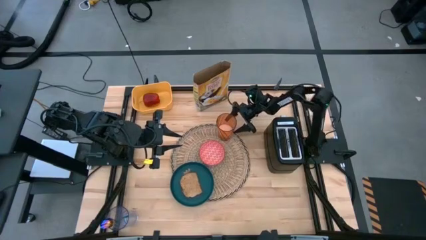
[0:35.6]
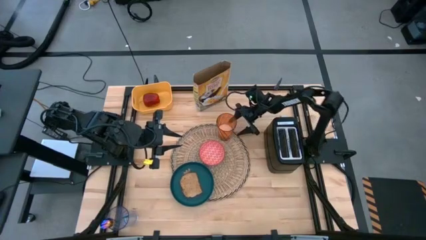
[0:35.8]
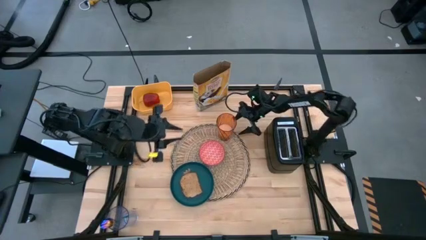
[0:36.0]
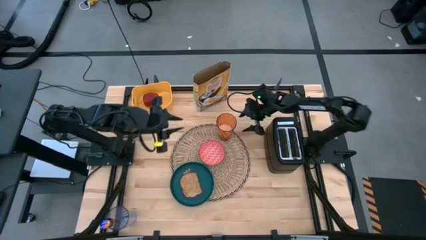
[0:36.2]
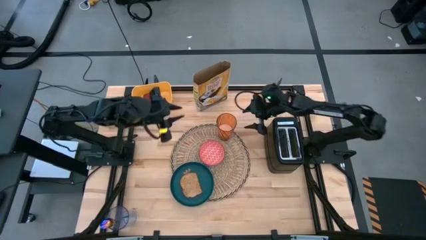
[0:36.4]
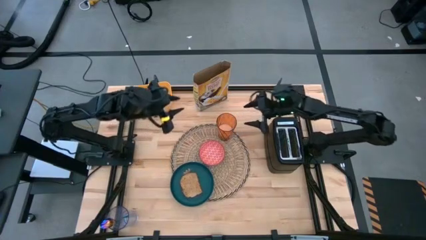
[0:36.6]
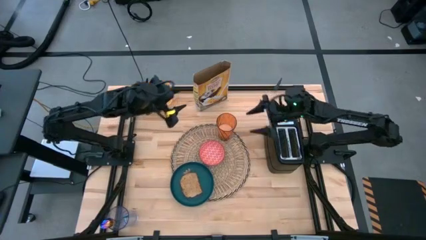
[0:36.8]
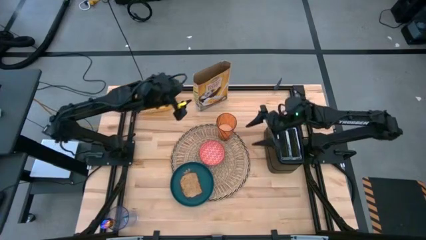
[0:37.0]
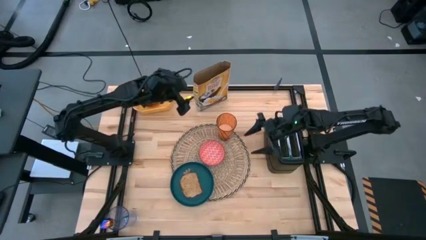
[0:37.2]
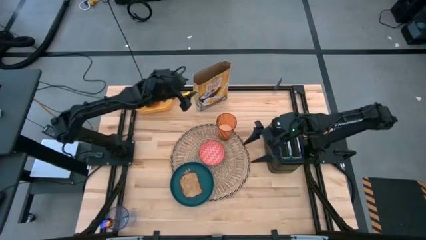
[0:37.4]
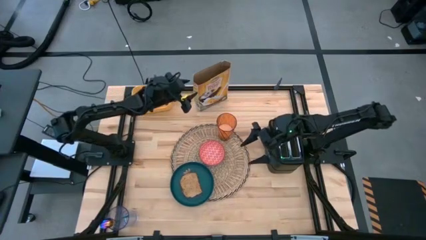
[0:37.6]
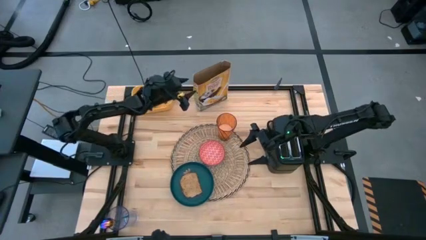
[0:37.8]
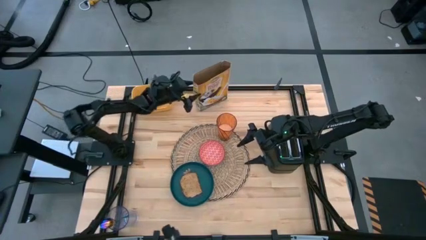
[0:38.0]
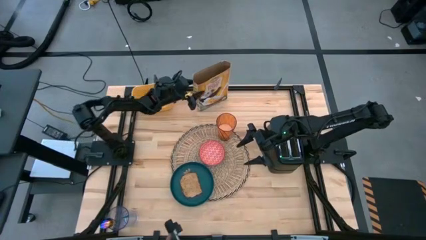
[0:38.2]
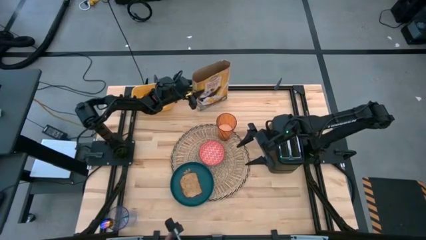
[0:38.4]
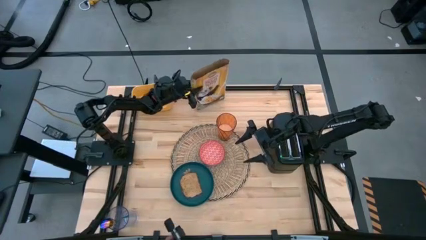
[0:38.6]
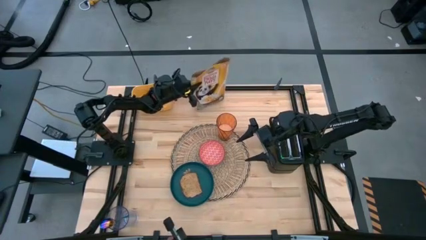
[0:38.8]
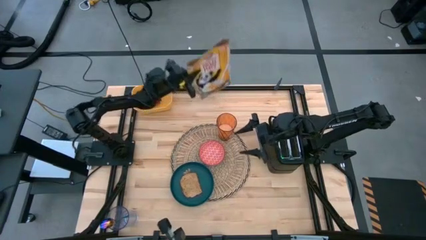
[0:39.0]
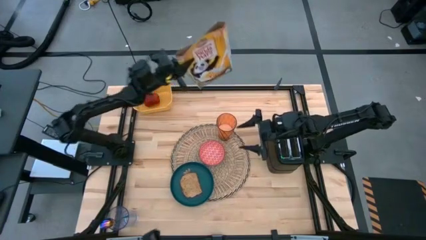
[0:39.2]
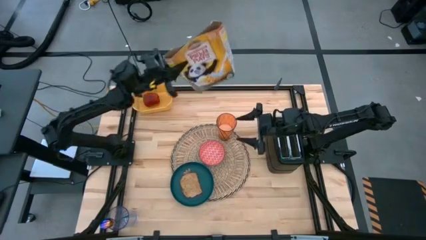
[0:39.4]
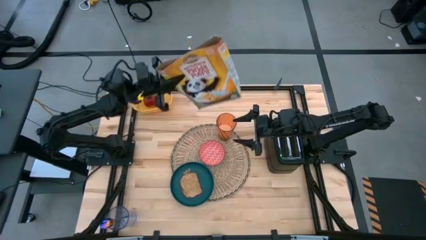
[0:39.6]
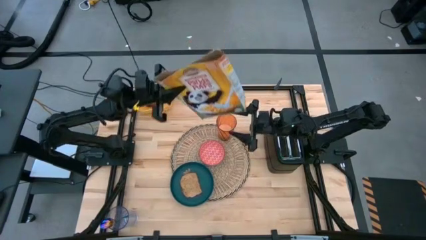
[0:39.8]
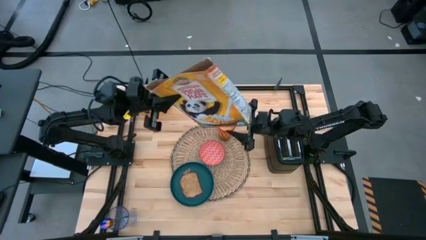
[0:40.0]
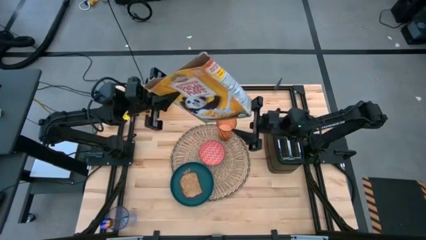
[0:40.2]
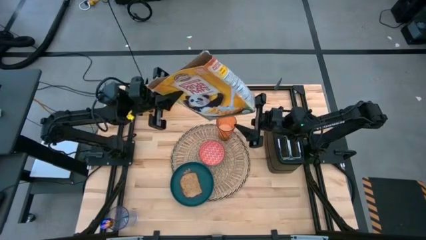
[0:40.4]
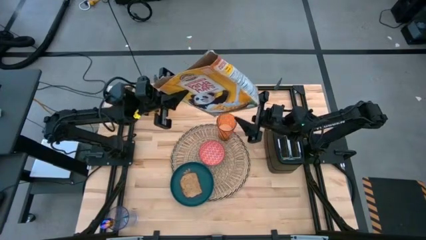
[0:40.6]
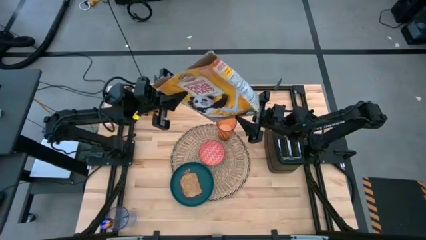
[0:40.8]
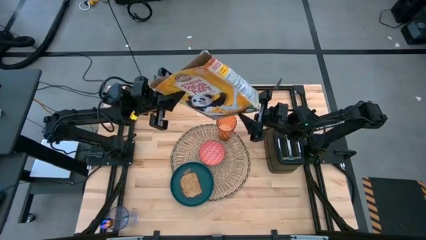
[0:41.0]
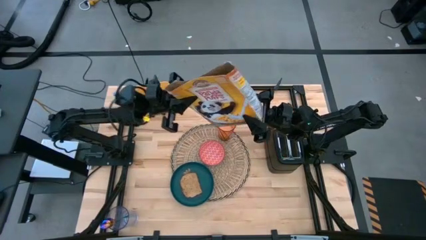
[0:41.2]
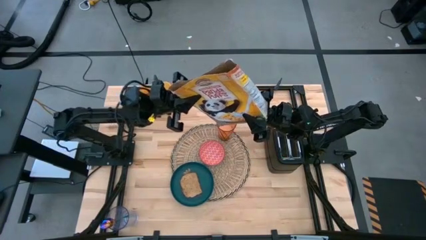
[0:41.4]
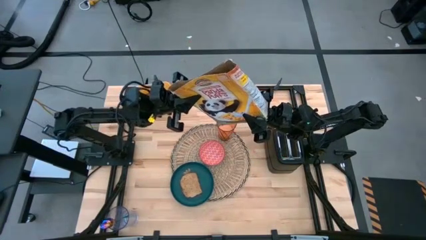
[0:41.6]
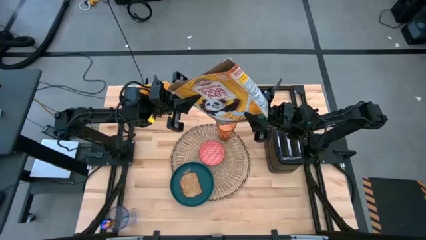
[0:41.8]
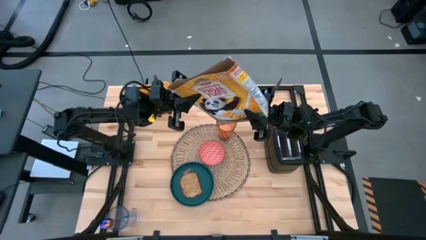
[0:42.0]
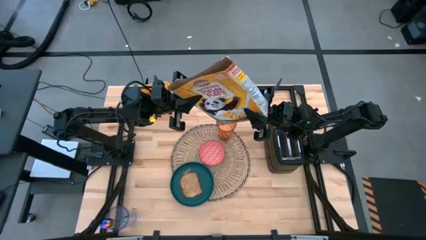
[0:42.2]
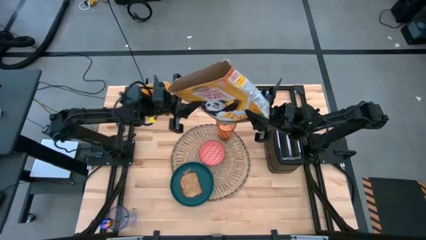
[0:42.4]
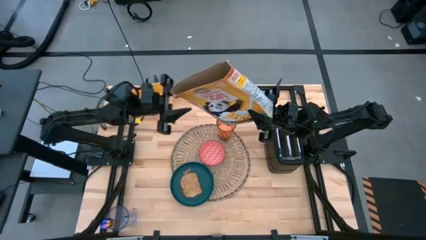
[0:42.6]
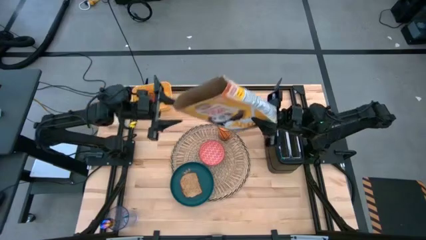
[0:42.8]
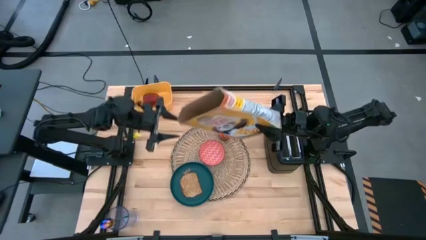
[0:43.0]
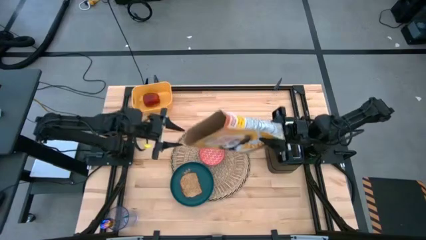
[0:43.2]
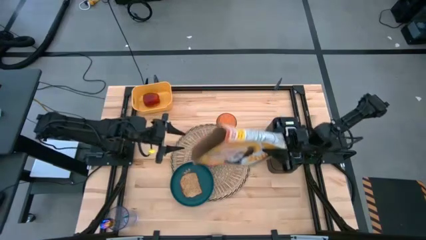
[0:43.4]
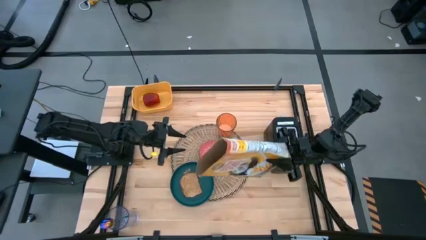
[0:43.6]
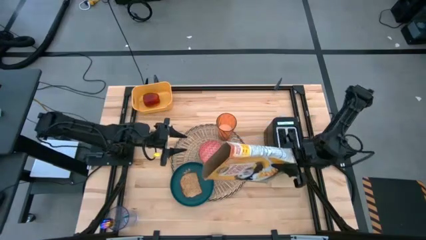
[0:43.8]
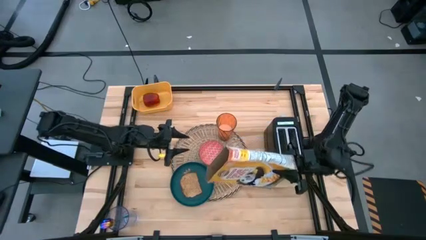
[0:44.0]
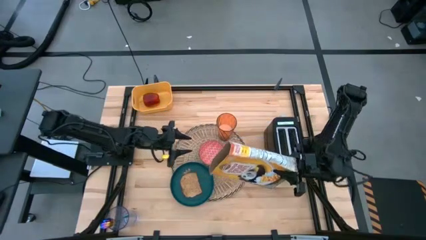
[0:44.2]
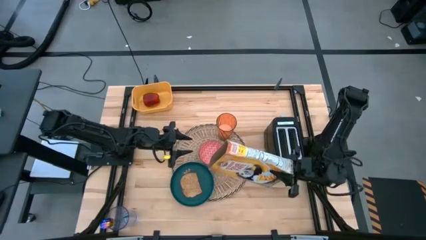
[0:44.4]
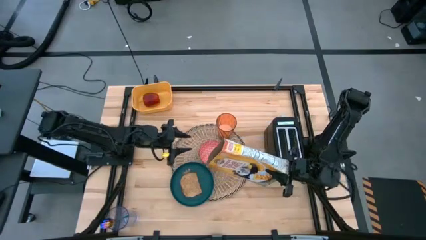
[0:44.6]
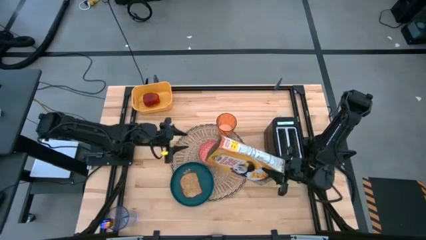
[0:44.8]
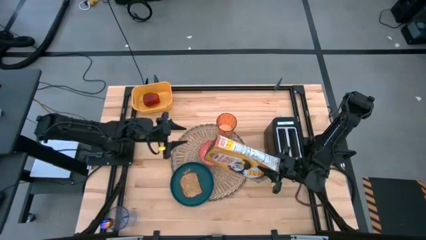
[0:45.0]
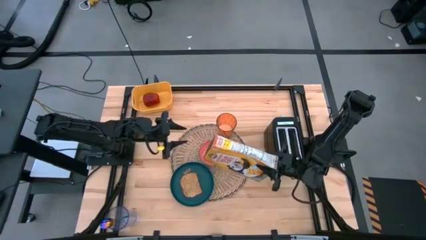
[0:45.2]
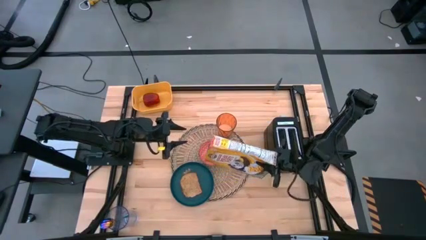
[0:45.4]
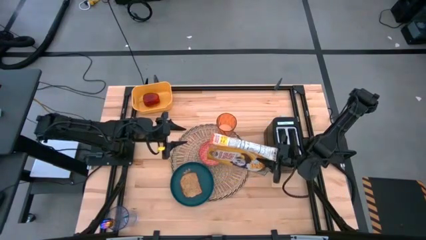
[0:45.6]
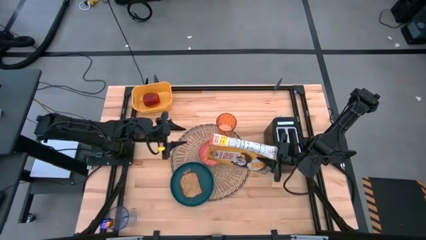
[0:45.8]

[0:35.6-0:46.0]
Task: Arrange a breakfast setting
Pour the cereal from the cereal box into the red bowl
